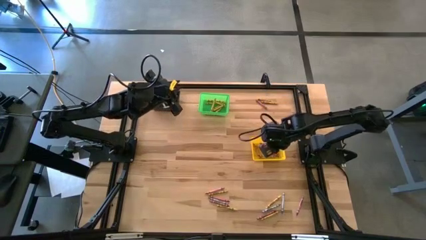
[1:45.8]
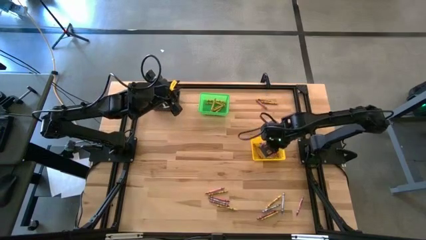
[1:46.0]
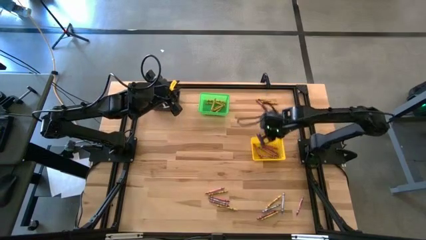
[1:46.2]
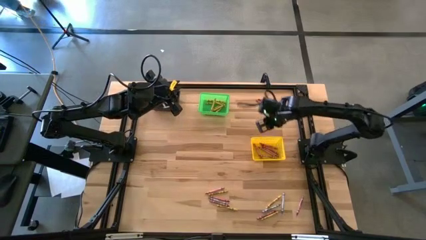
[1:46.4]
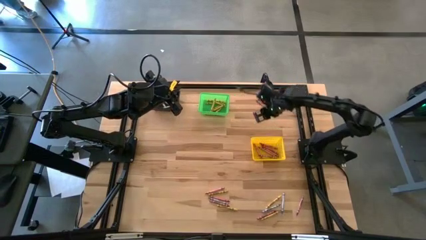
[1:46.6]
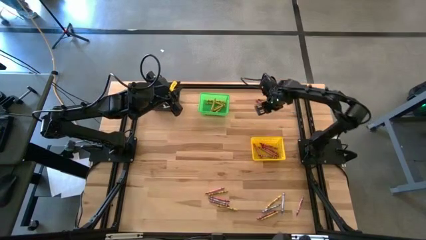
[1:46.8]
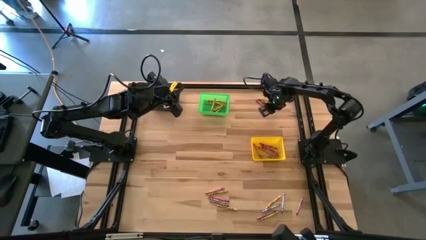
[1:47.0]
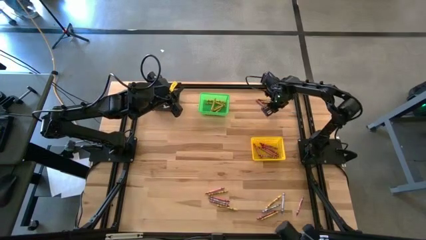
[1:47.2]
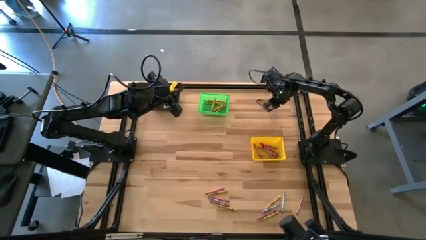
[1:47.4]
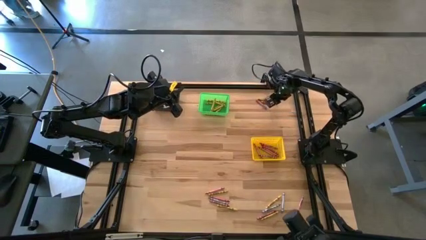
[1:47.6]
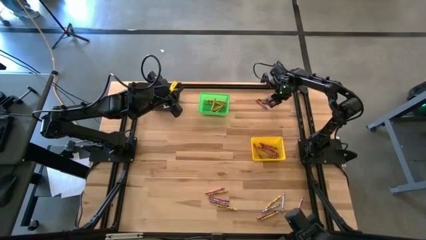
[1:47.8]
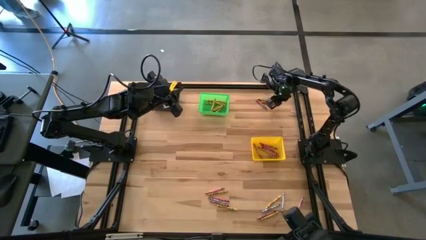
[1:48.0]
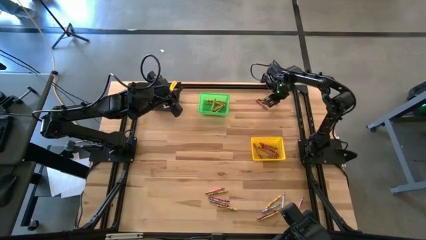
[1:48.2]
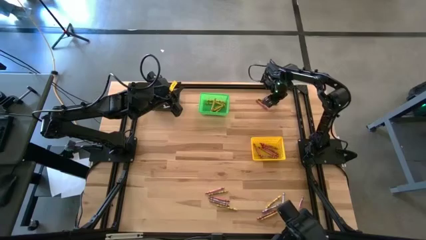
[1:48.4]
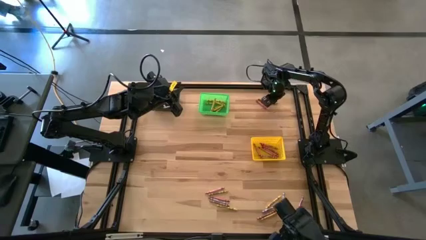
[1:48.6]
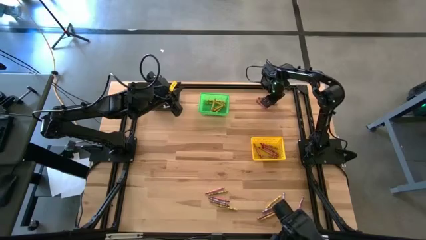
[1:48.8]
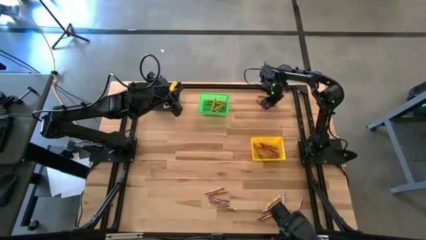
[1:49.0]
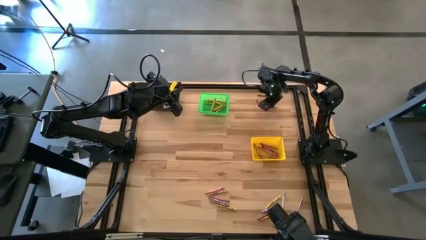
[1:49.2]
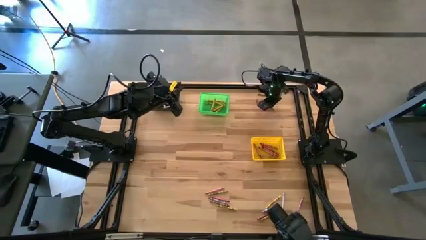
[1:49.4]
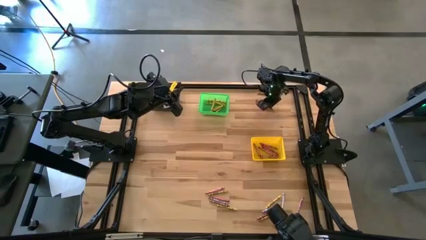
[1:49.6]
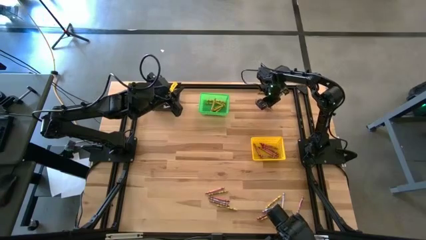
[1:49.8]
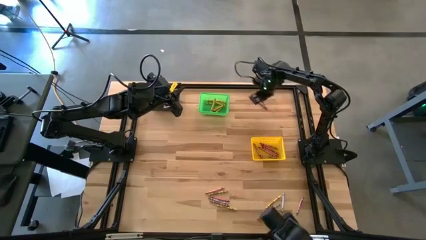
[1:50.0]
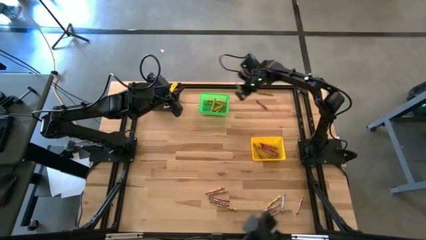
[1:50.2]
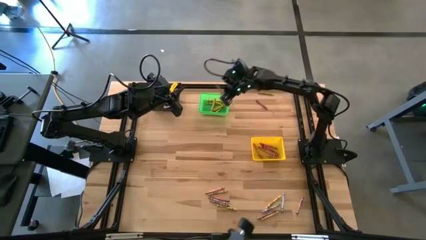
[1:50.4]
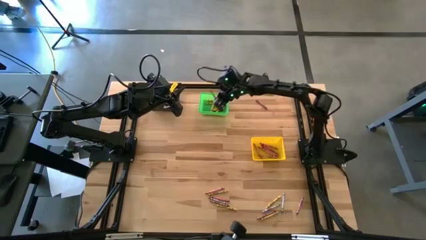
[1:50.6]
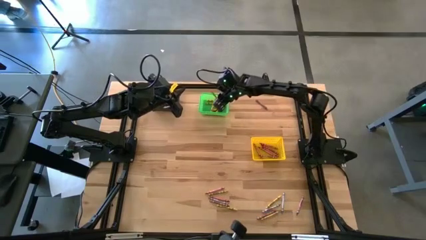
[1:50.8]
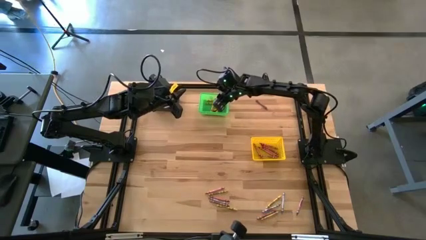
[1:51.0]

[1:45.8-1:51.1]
Task: Sort crayons
Put the yellow crayon into the green basket

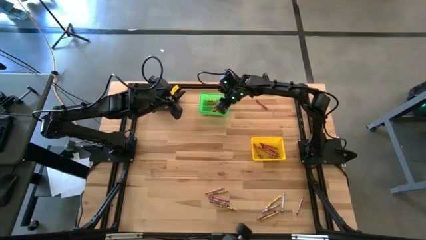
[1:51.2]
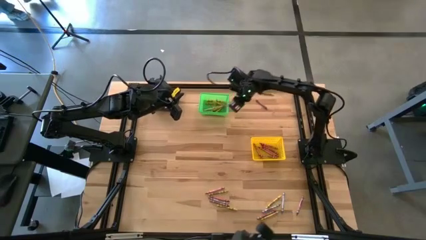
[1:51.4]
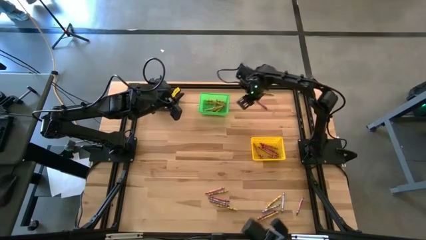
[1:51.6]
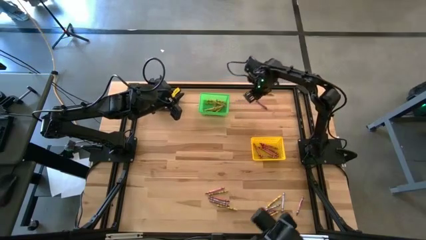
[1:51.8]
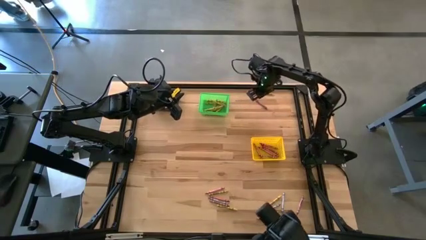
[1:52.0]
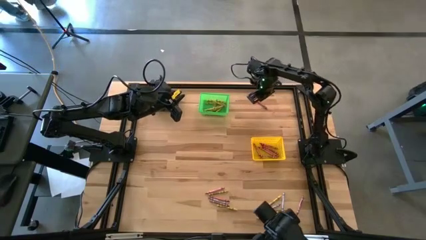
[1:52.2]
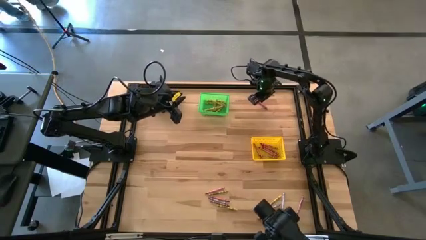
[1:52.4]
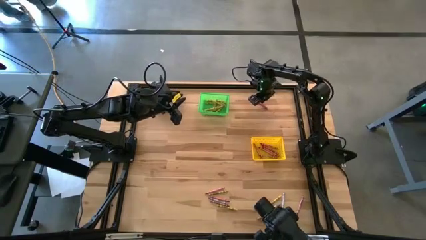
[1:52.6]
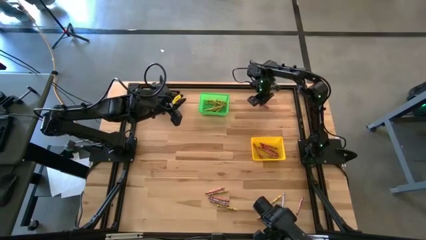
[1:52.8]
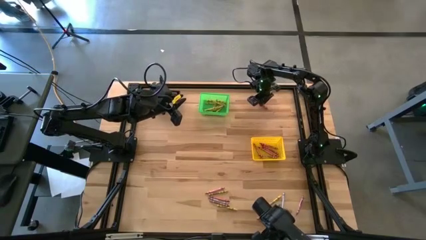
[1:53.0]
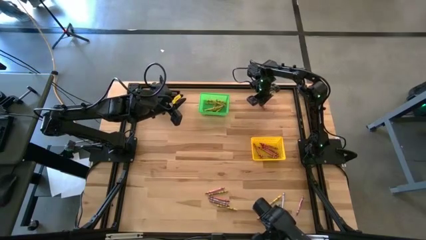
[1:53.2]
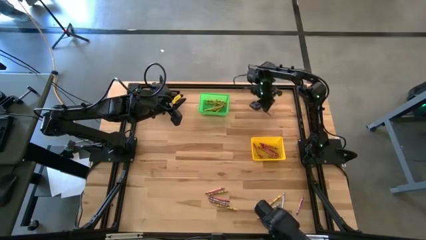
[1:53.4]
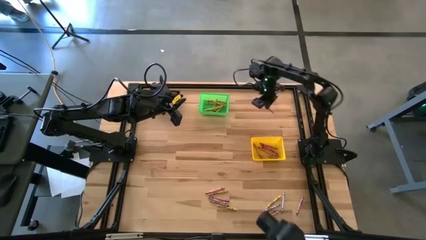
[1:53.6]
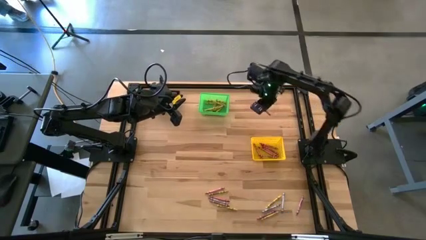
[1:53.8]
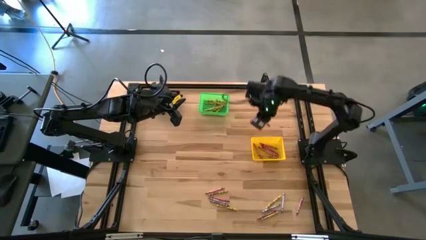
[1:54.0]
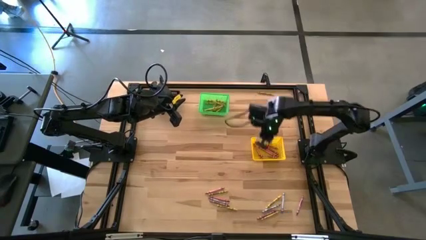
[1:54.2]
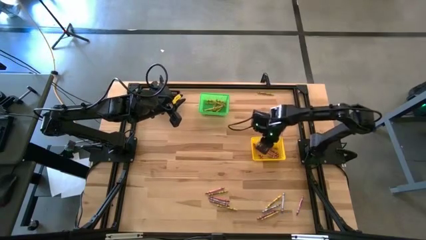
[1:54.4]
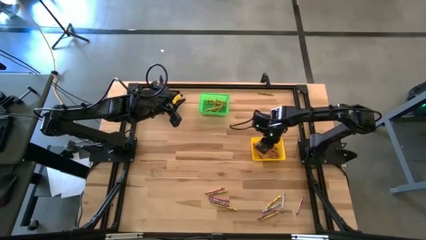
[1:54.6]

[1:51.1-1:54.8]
Put the red crayon into the yellow basket

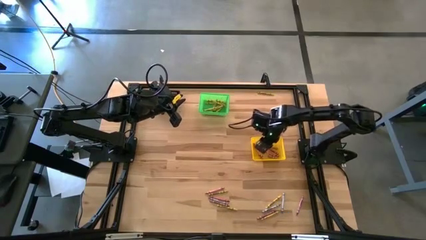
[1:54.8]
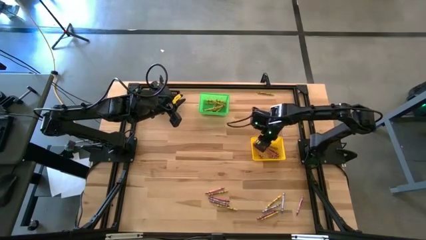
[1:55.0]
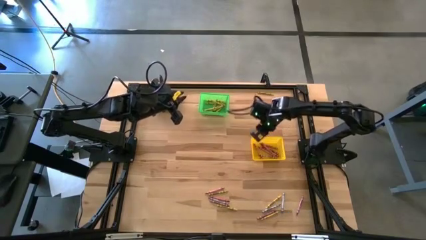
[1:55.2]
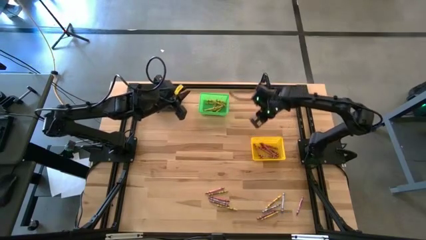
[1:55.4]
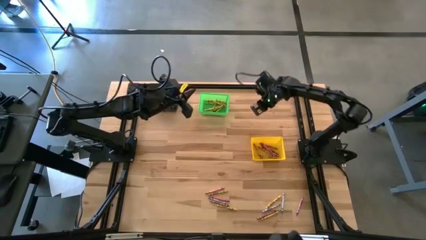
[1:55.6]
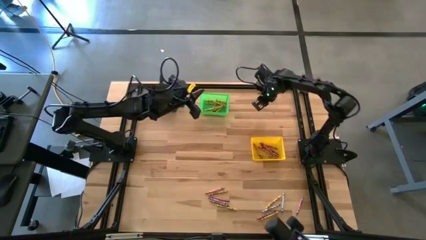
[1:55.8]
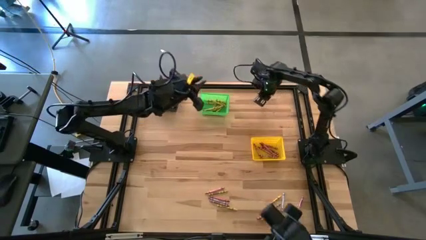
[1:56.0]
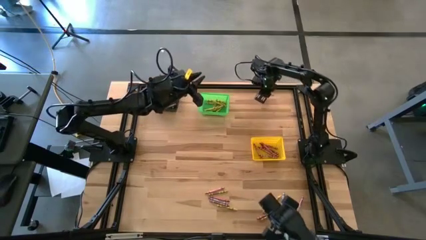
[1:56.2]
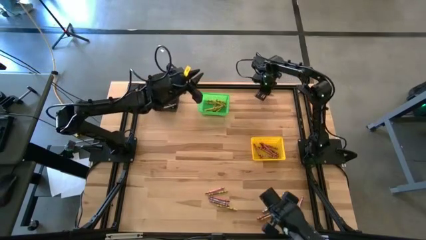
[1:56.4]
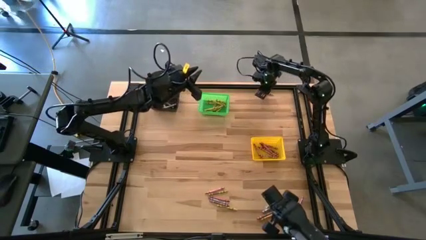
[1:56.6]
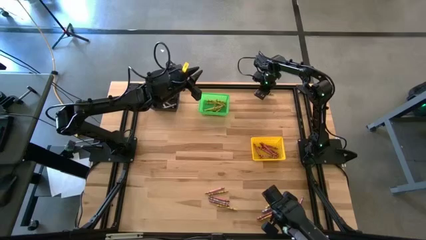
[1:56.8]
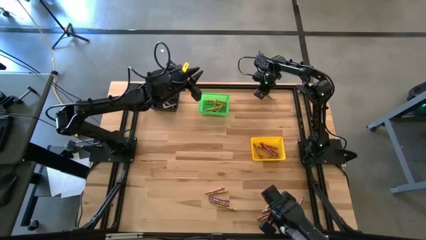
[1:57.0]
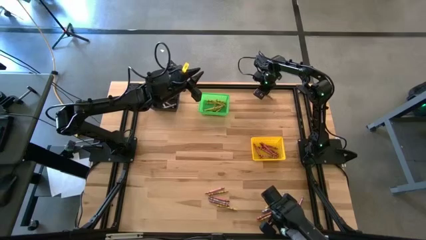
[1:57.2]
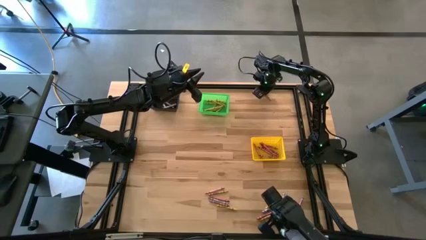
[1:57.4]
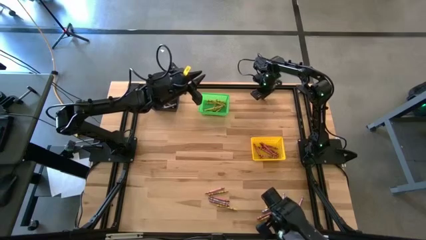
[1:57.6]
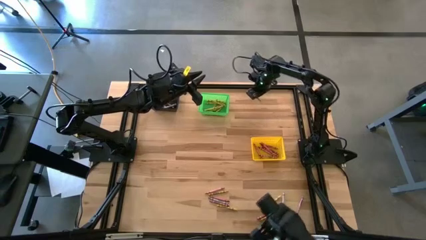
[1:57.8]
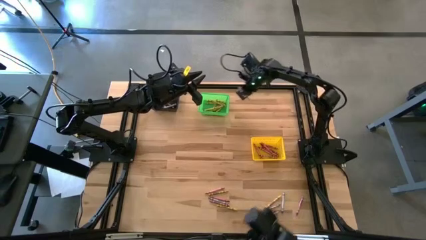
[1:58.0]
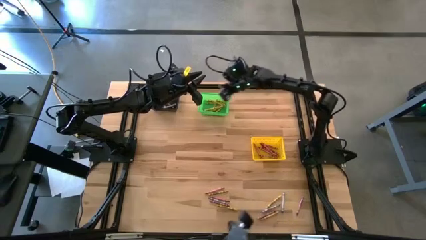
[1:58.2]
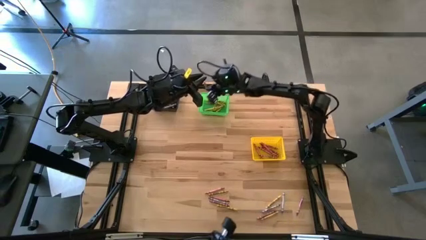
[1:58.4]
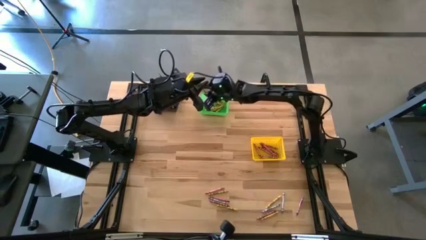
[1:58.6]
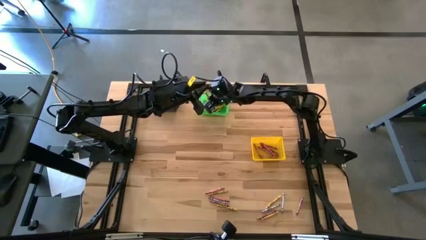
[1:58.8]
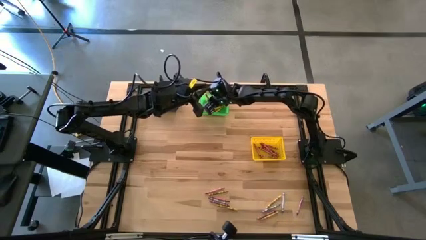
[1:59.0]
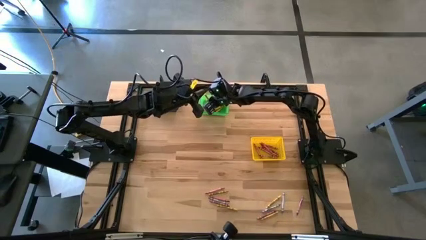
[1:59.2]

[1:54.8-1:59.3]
Put the yellow crayon into the green basket

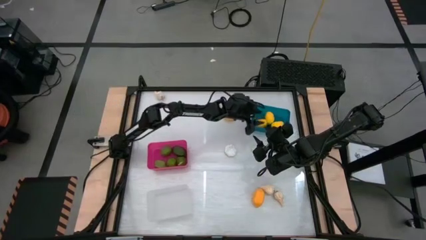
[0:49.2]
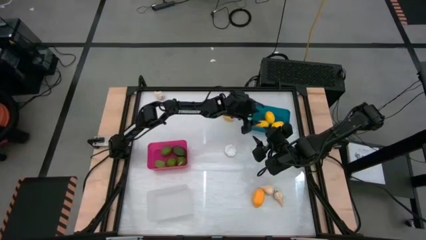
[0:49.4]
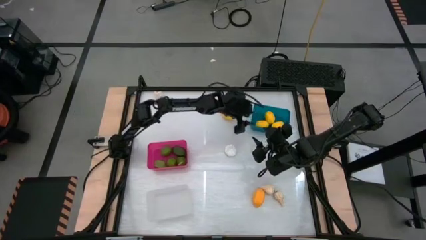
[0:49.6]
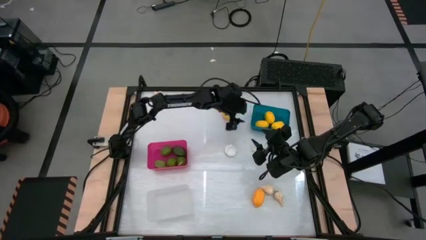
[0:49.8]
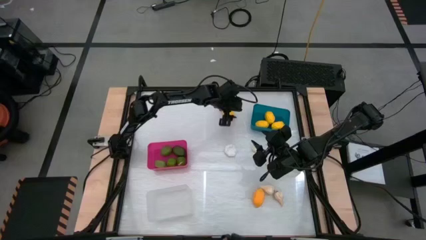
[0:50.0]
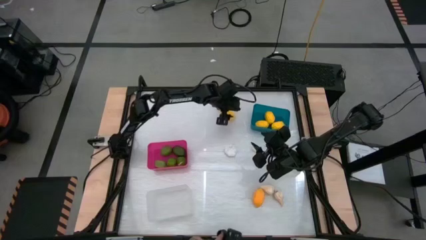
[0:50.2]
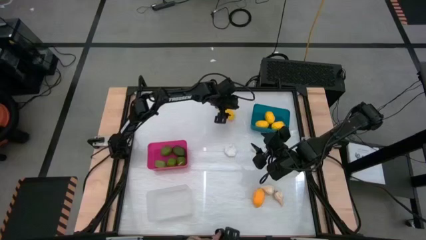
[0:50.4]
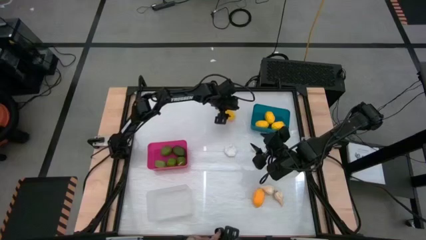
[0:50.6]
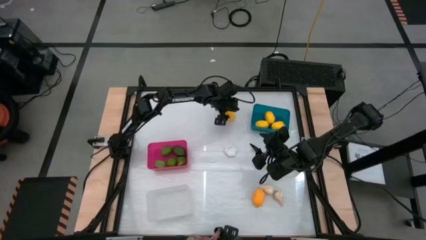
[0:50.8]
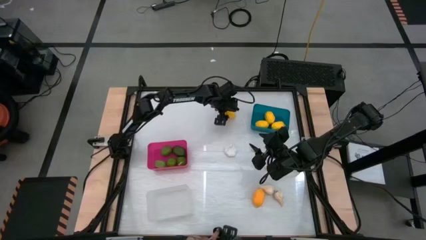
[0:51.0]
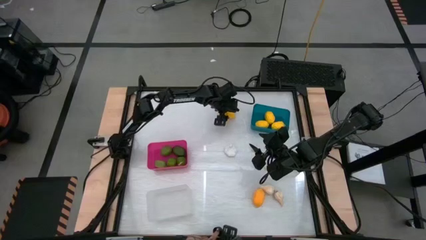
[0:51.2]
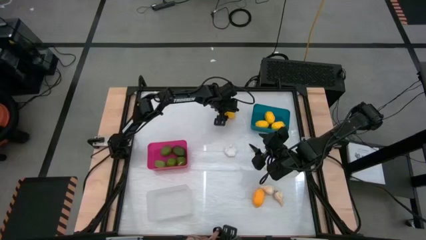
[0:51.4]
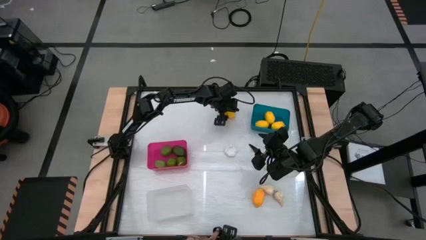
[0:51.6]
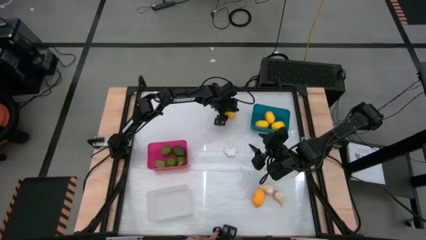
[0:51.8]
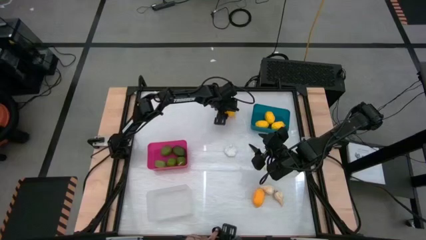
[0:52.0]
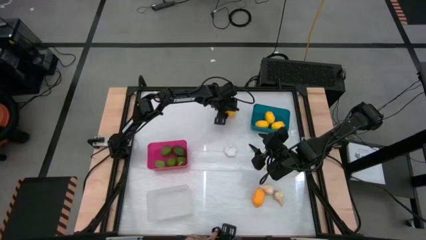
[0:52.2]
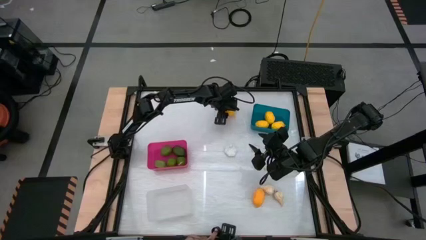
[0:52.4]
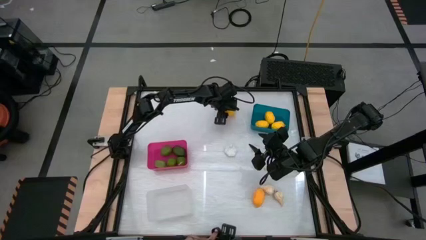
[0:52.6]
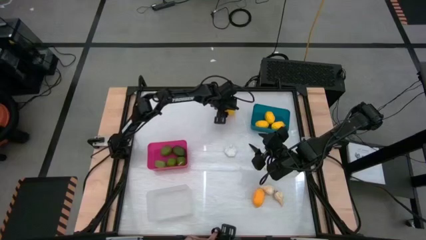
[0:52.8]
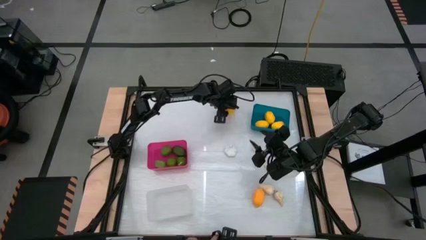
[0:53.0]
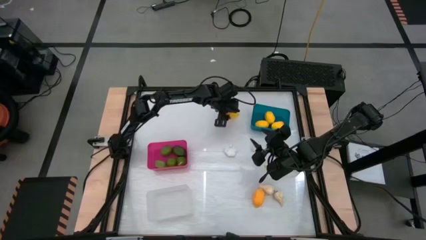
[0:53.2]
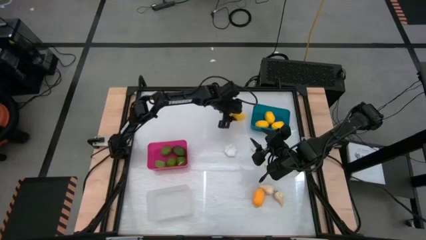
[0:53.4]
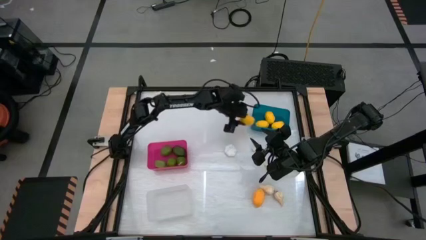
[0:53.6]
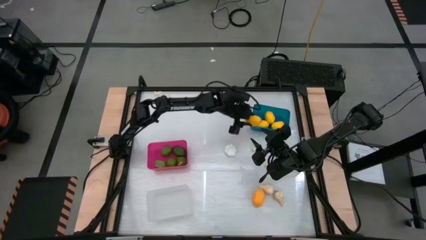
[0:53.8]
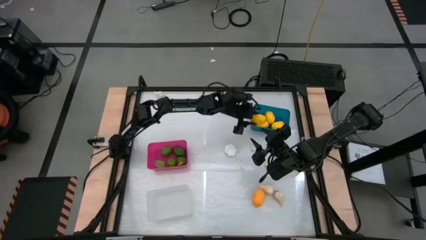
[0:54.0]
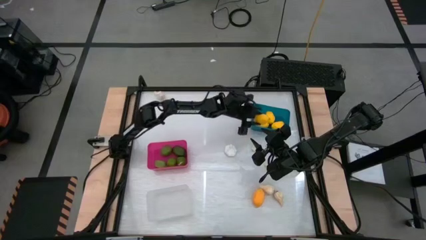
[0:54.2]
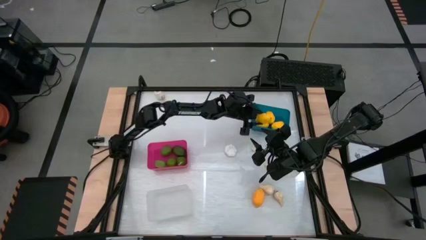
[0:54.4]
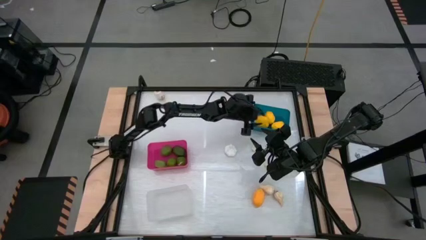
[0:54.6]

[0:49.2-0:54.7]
Task: Sort produce into baskets
Put the lemon into the blue bin
